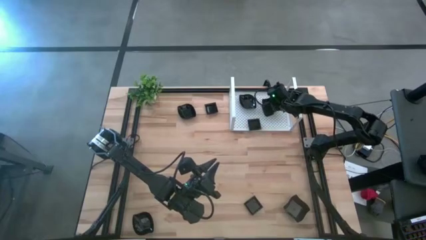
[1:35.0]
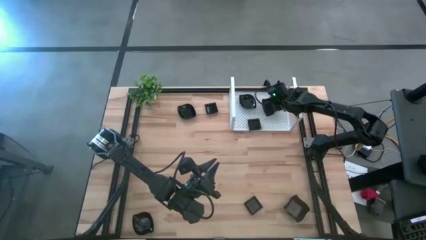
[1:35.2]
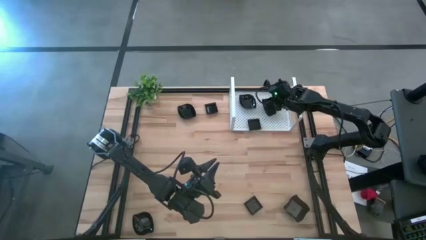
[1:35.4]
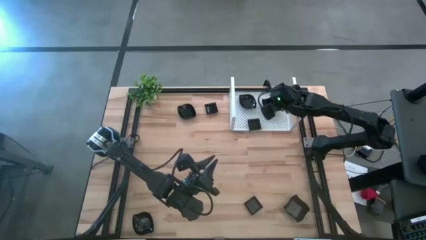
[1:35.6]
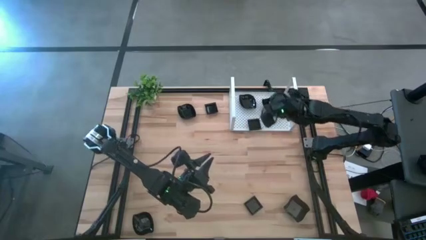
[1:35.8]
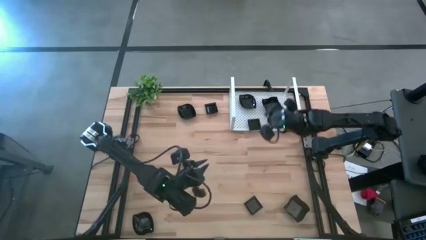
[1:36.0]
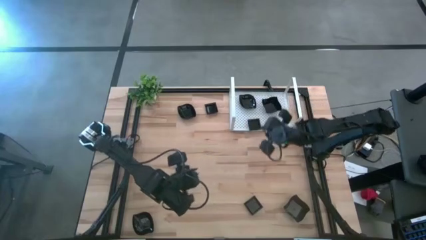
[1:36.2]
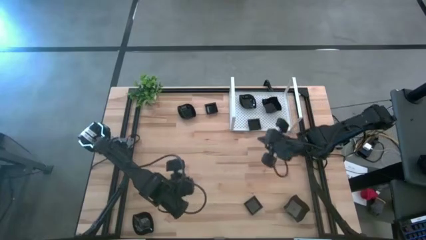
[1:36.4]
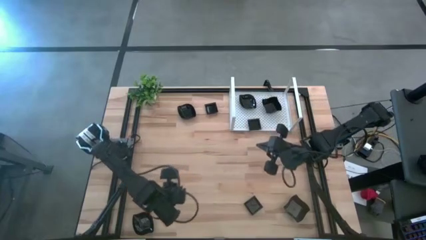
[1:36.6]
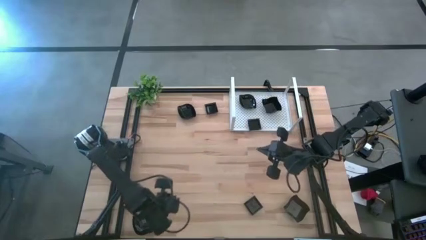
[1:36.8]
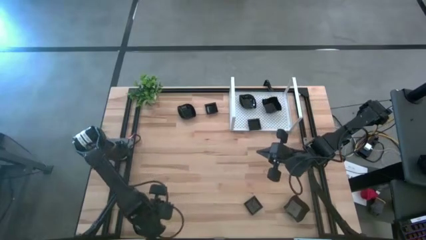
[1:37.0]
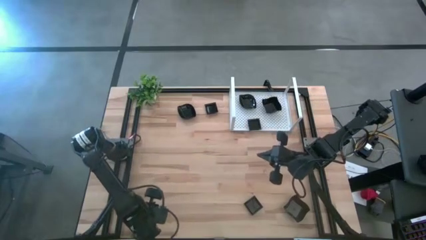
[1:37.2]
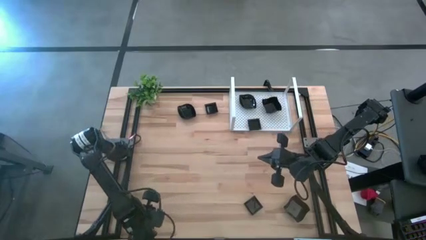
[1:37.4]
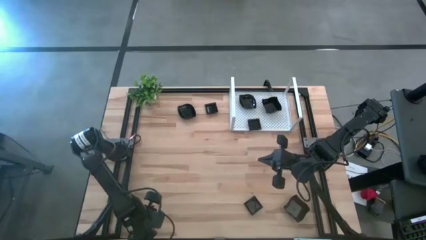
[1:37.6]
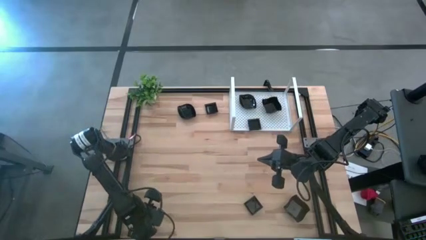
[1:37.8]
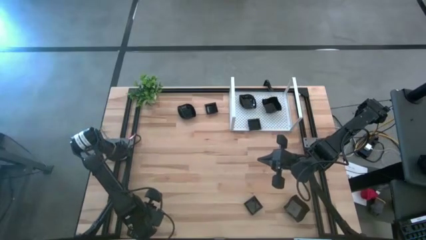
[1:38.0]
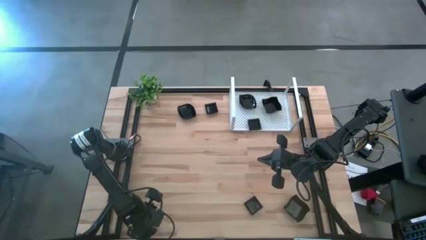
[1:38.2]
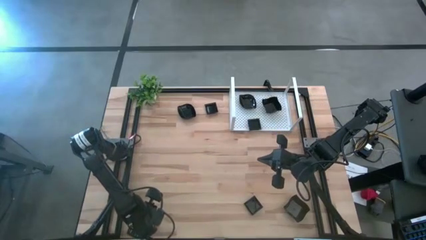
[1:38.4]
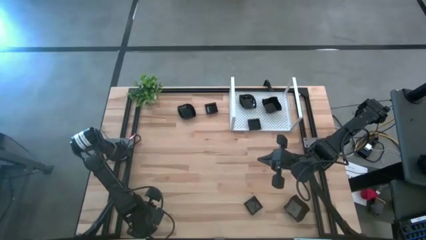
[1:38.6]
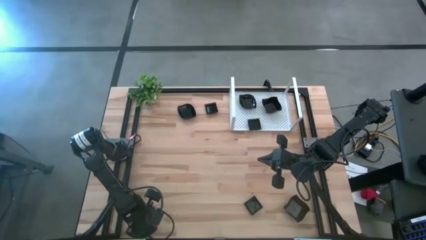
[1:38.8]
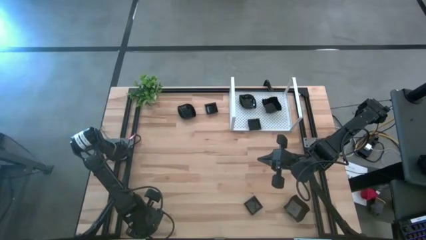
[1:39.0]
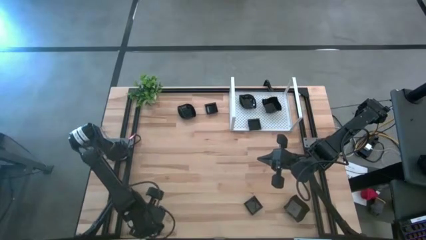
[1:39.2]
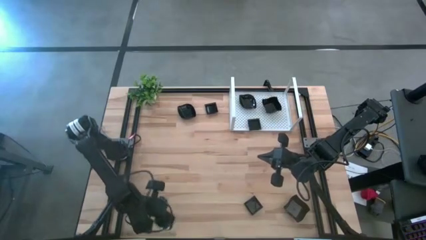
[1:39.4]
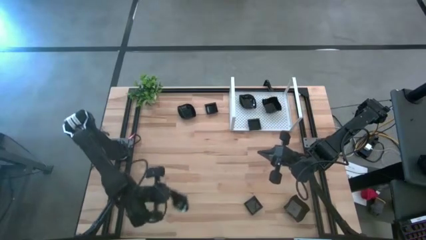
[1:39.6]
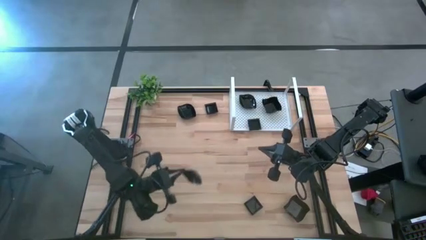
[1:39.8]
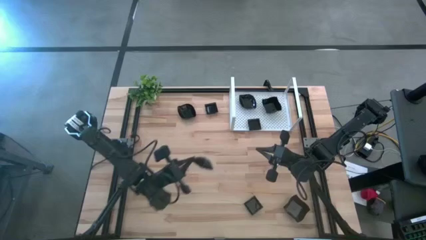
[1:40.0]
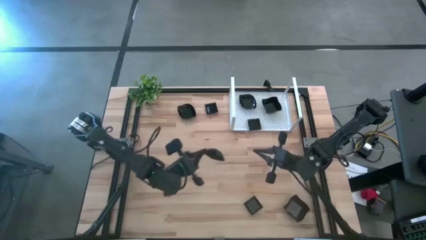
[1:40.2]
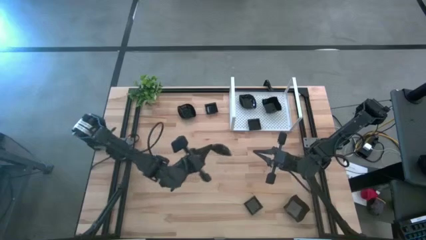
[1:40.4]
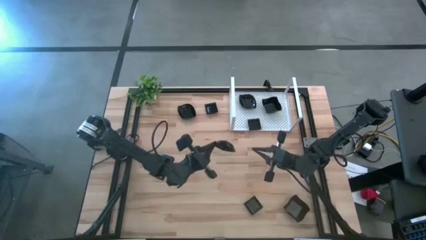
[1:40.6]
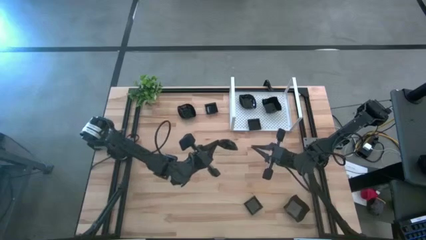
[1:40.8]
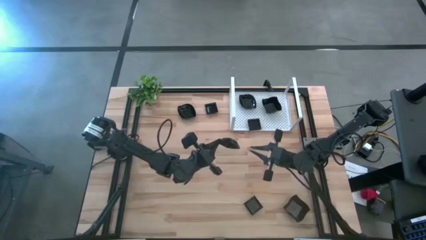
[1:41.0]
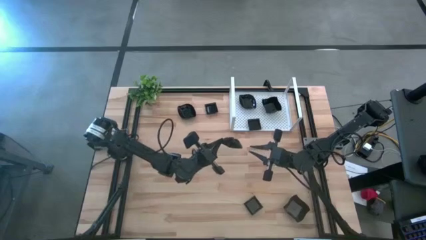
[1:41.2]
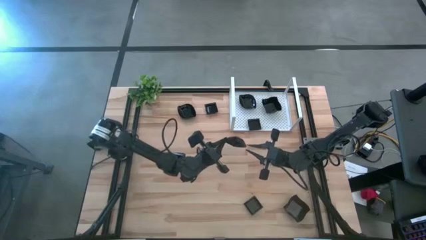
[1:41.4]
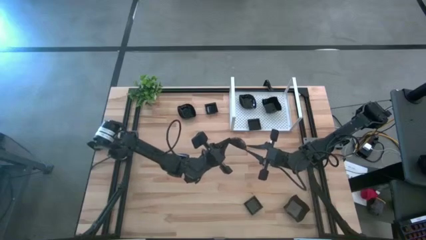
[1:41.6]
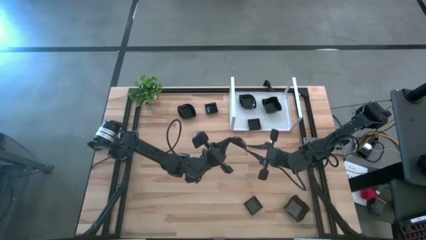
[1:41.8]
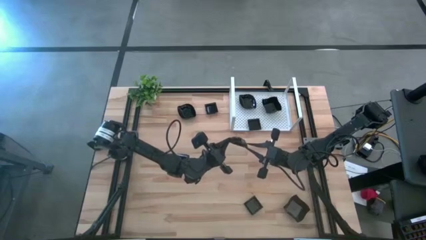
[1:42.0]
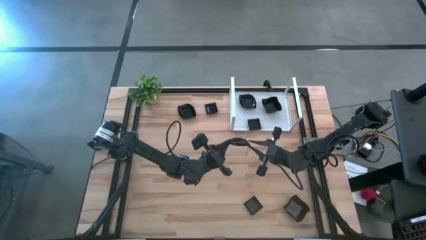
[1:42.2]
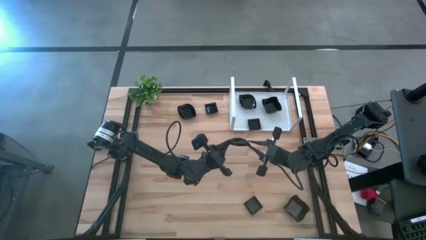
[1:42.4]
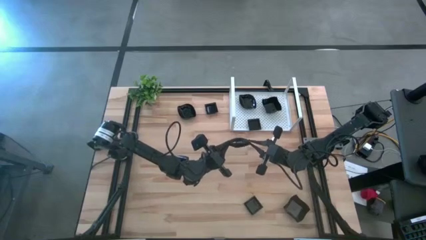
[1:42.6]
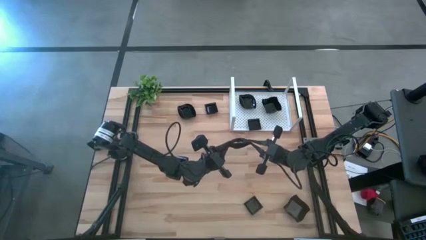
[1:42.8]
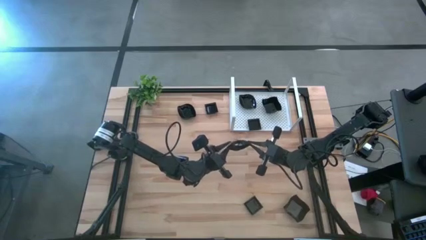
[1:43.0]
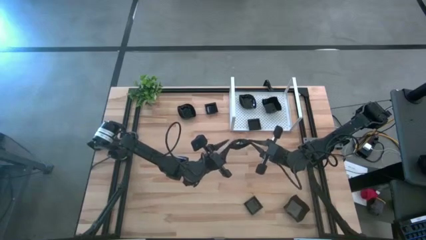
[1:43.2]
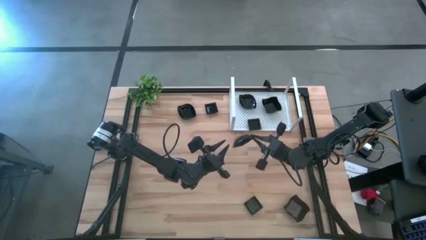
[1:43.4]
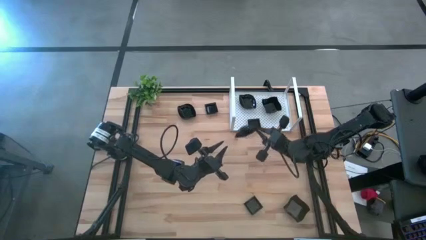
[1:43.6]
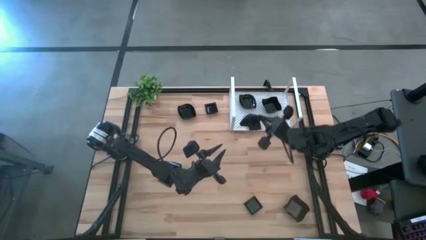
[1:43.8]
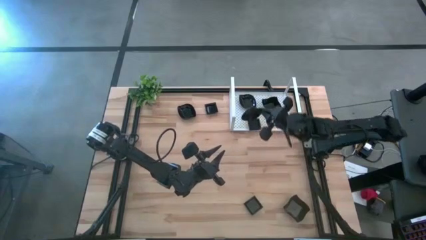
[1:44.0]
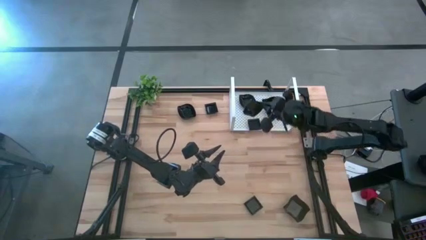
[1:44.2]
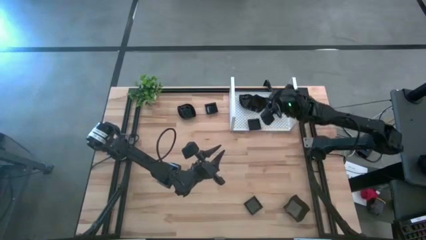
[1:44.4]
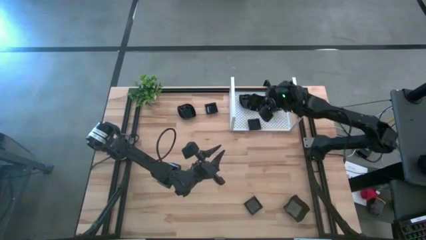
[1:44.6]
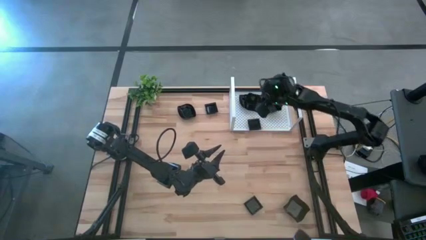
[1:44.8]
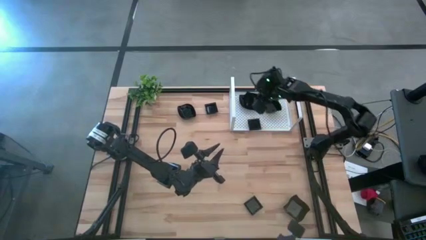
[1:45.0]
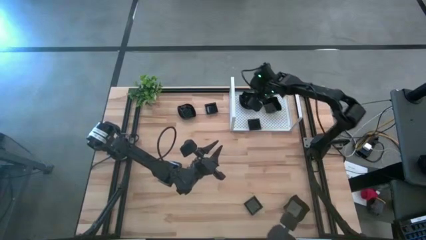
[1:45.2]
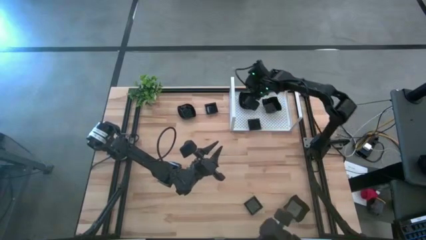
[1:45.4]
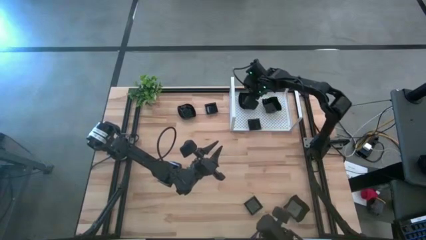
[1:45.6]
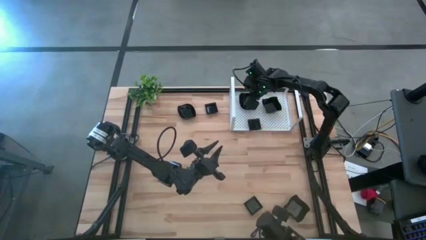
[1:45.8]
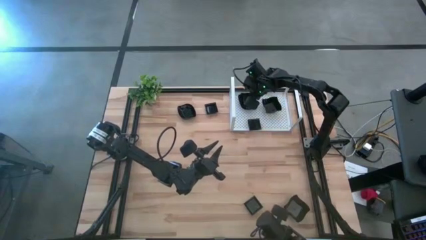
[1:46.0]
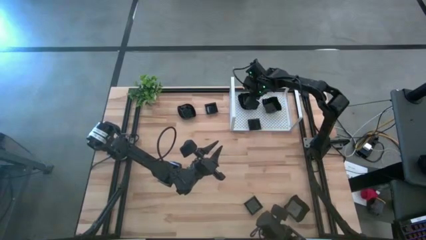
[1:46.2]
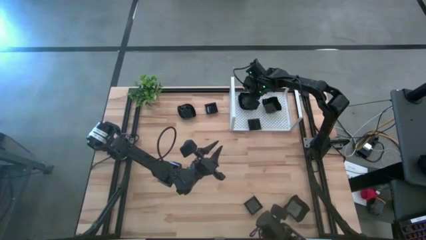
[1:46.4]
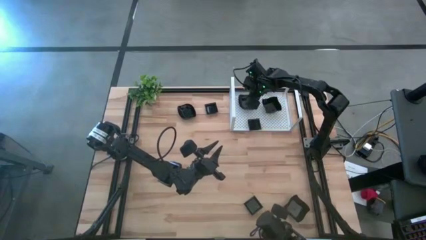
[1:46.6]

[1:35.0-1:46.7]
Task: Pick & Place Mini shaped plates
Stack the leaf shaped plate on top of the other leaf shaped plates on the shelf

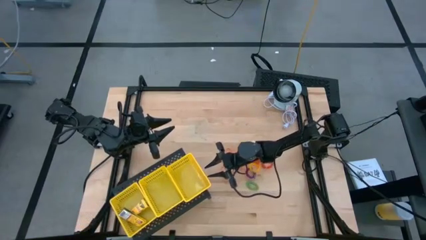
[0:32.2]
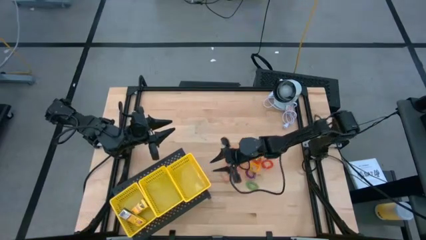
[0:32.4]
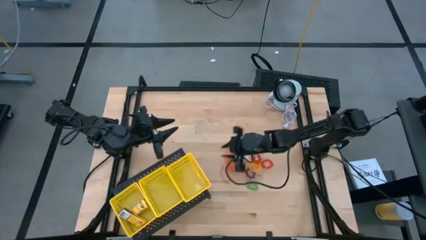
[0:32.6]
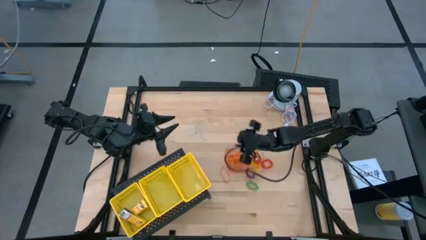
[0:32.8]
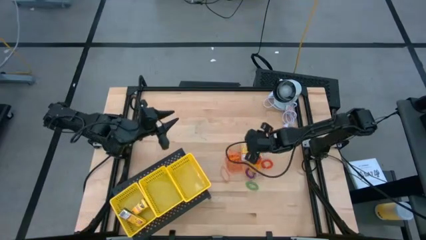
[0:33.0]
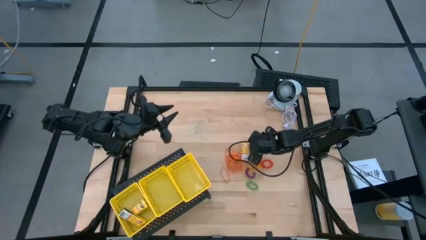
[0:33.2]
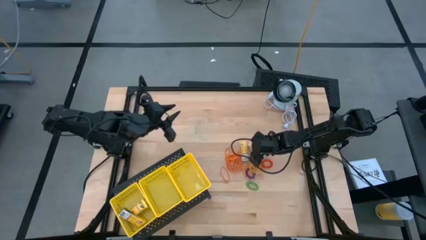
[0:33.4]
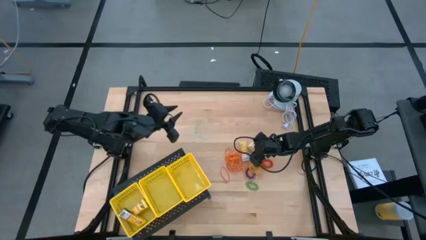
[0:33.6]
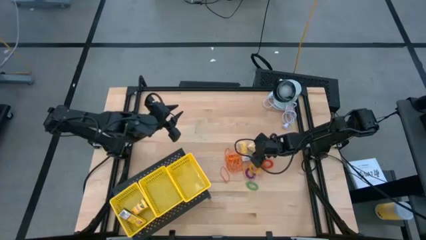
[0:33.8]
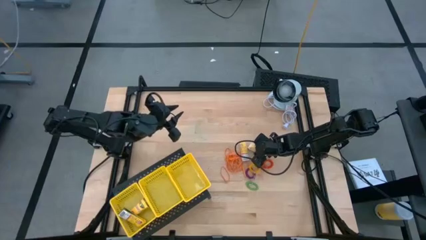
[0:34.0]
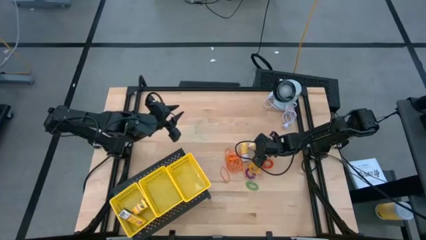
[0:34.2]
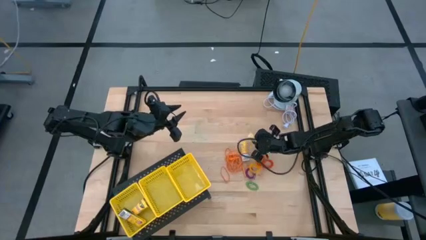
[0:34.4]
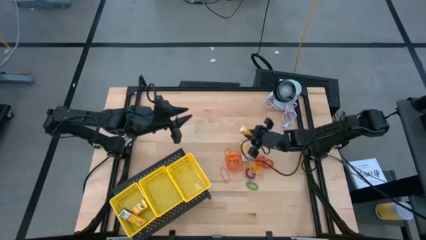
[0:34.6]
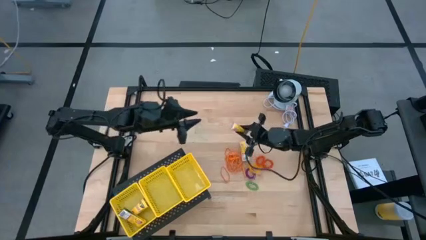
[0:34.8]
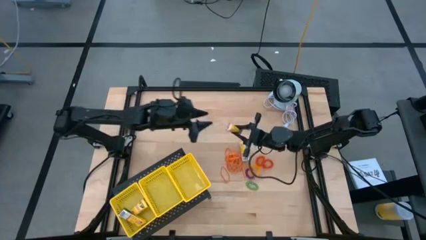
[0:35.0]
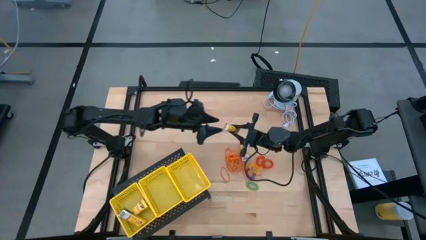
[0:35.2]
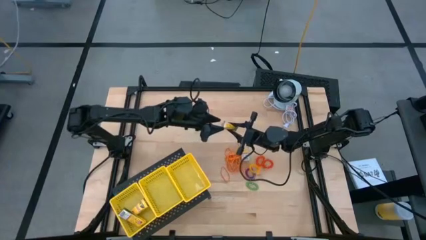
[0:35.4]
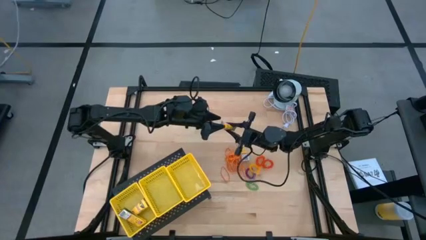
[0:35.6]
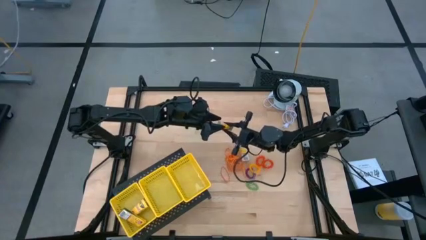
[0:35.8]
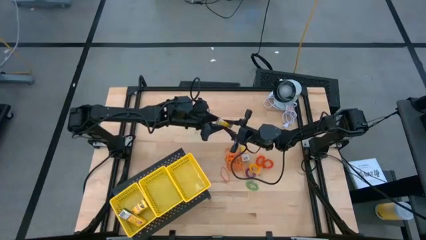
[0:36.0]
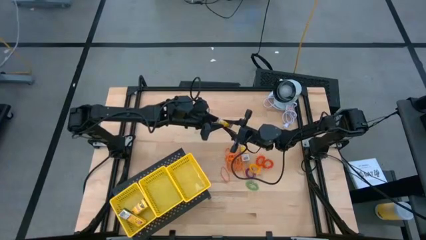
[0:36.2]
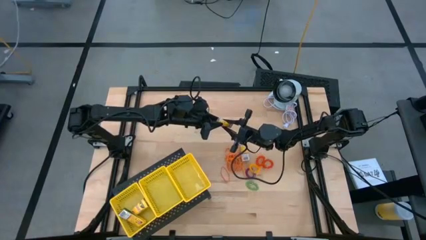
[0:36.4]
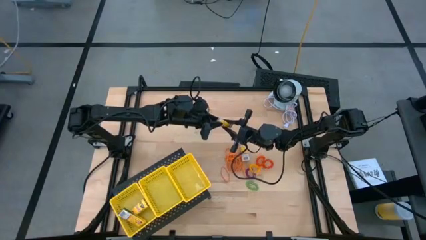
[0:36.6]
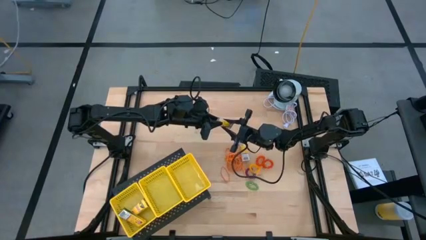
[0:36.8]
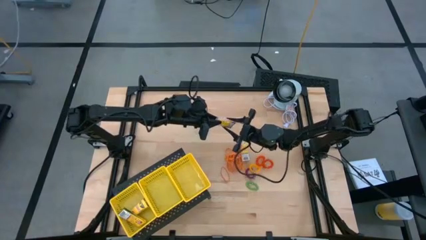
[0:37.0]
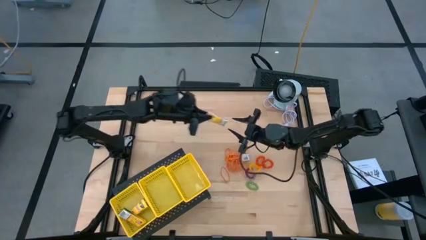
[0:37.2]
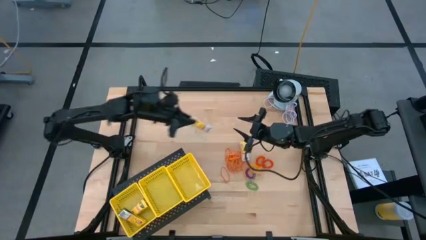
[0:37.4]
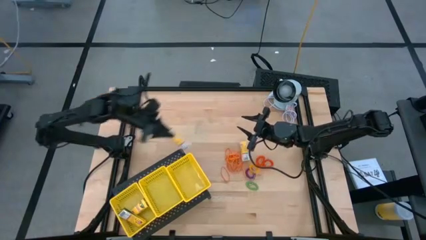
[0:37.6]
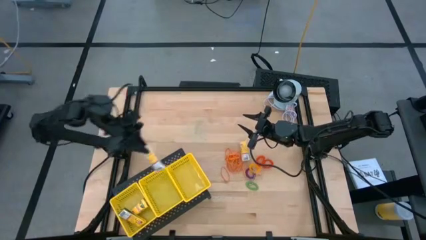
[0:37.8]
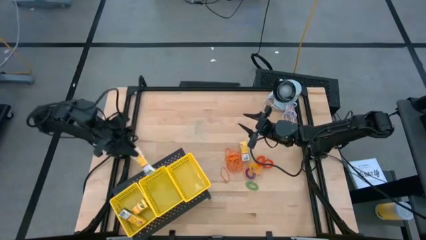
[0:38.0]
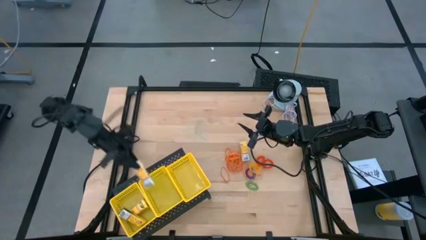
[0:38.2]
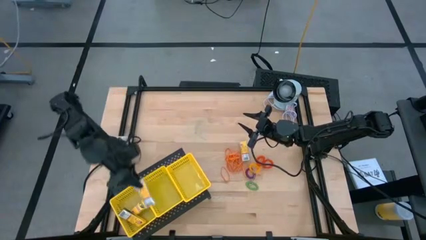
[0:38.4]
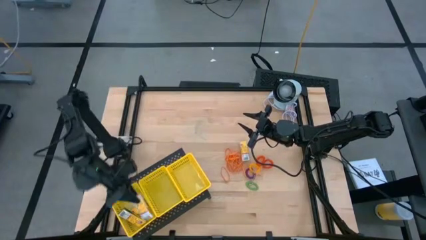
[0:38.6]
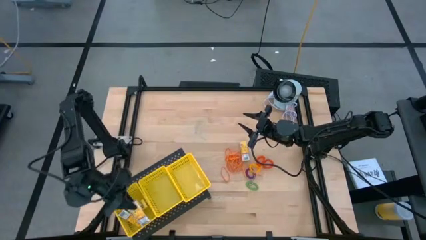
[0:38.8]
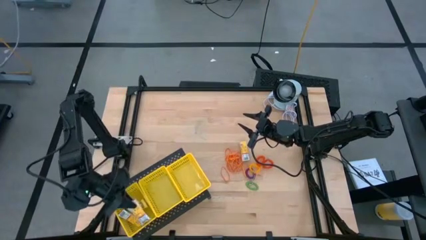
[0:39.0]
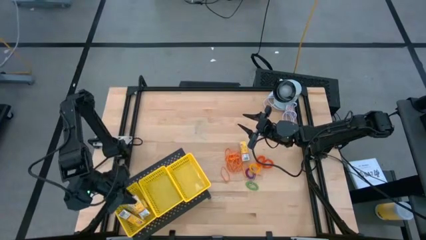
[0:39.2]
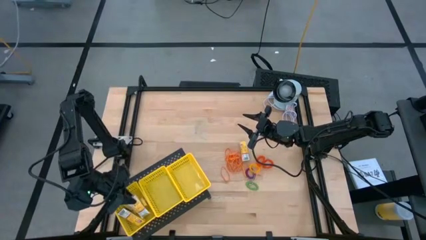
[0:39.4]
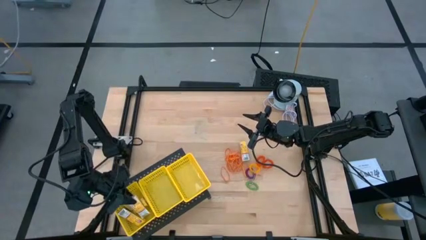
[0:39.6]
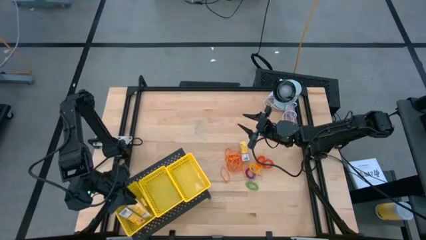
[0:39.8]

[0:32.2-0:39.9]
Task: Pick & Place Office Desk Supplies
Adjust the yellow bins on the shelf
